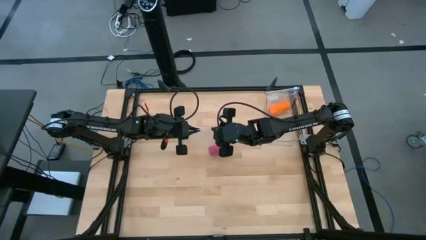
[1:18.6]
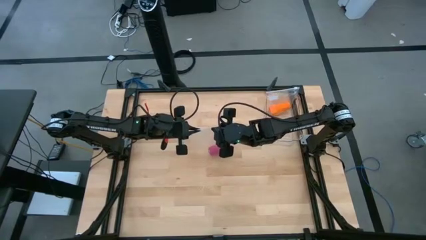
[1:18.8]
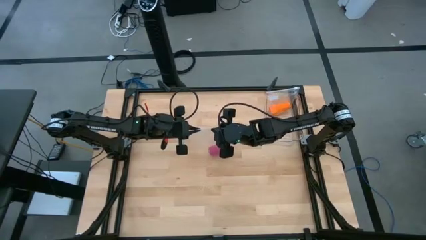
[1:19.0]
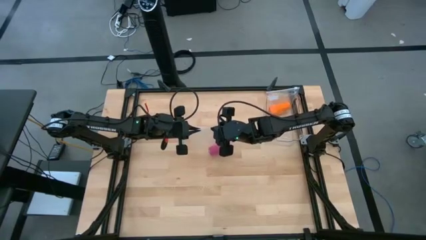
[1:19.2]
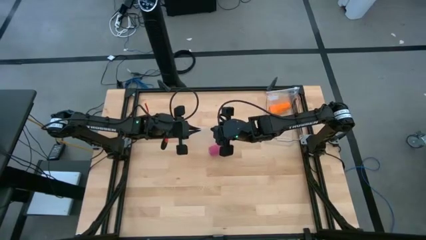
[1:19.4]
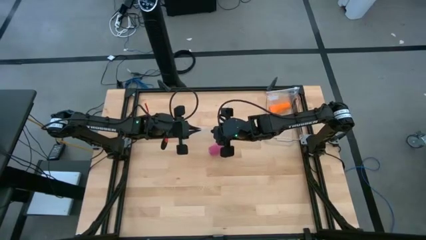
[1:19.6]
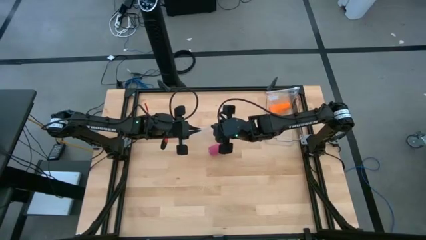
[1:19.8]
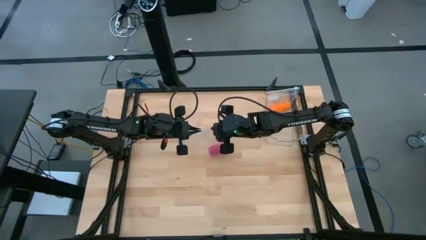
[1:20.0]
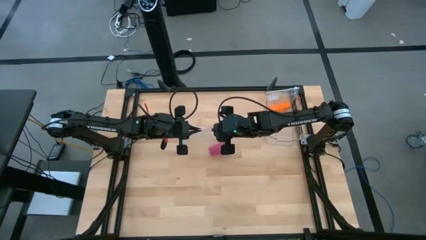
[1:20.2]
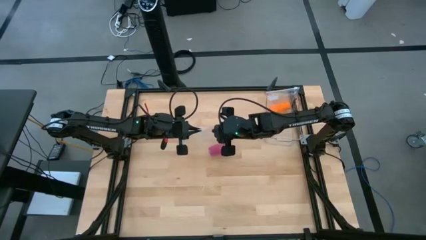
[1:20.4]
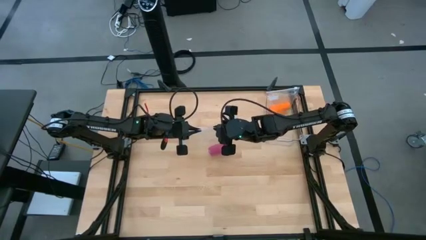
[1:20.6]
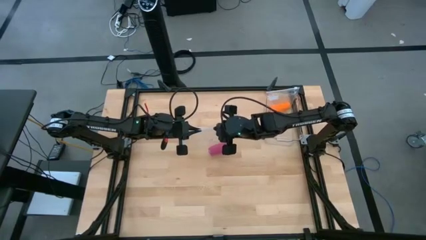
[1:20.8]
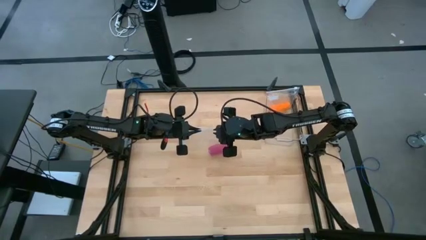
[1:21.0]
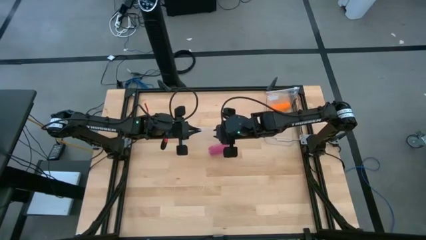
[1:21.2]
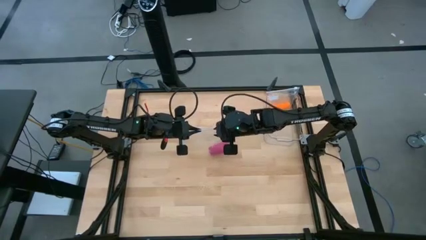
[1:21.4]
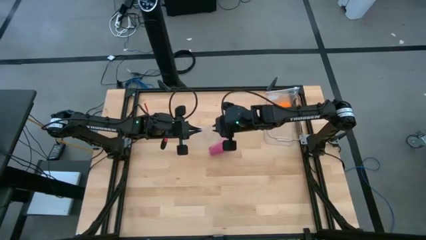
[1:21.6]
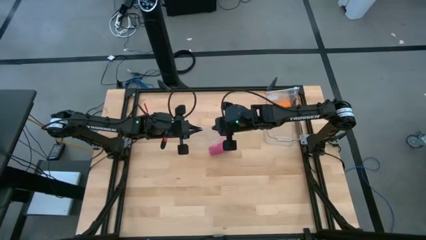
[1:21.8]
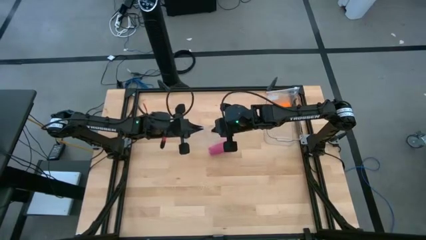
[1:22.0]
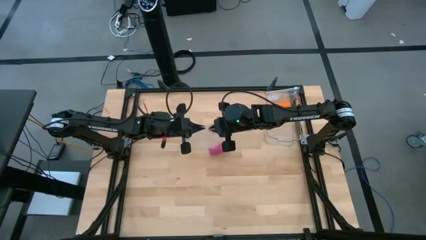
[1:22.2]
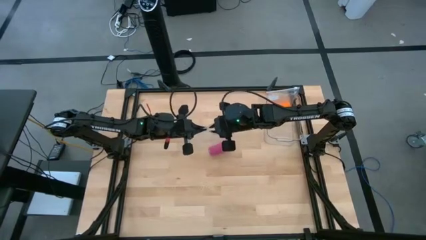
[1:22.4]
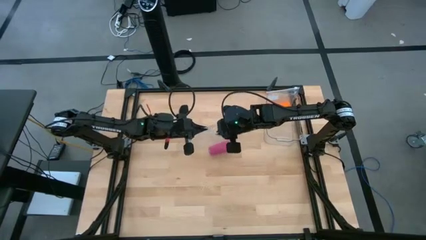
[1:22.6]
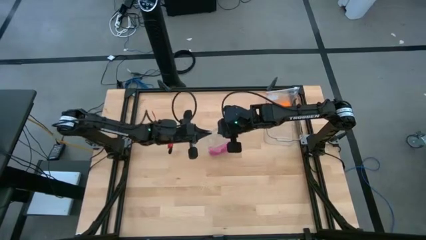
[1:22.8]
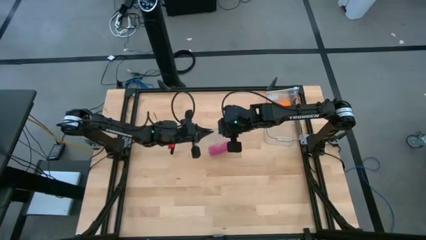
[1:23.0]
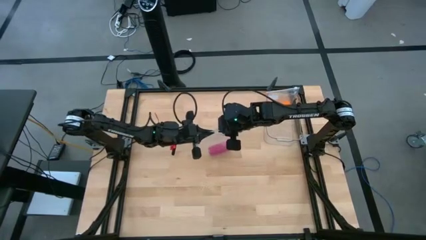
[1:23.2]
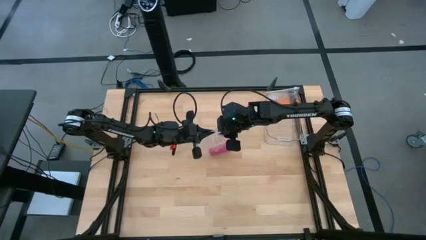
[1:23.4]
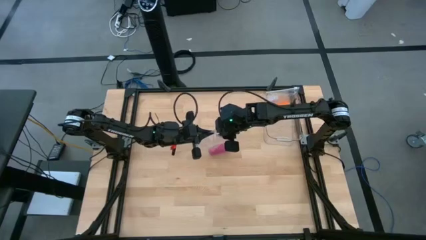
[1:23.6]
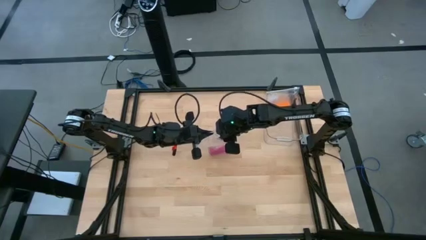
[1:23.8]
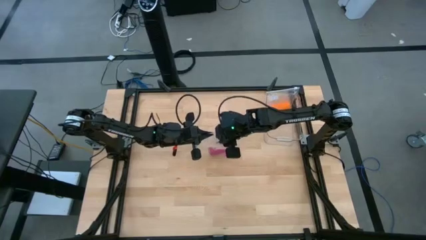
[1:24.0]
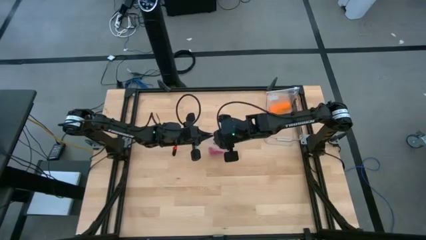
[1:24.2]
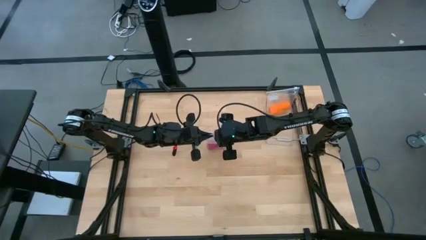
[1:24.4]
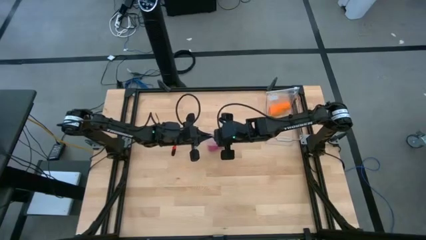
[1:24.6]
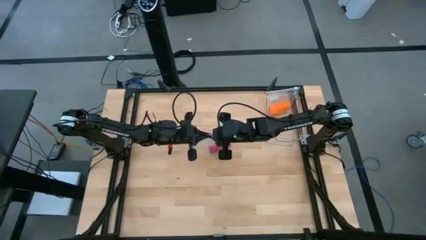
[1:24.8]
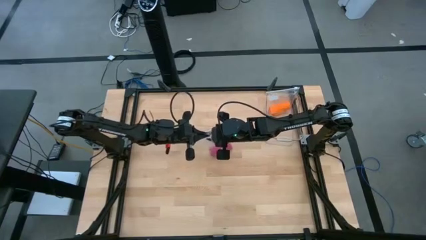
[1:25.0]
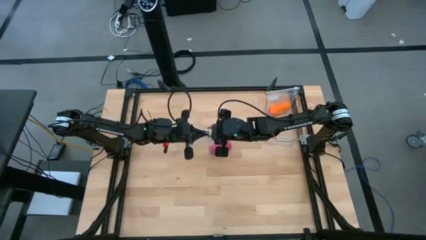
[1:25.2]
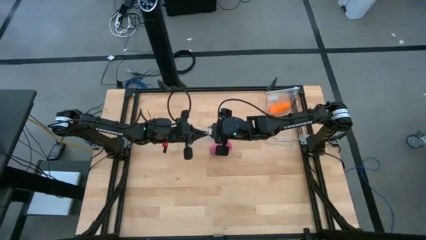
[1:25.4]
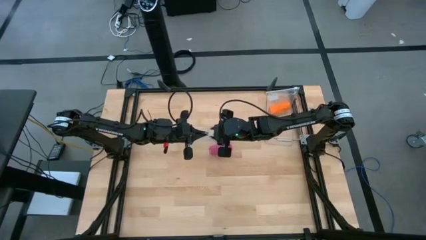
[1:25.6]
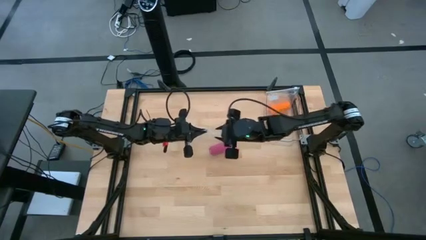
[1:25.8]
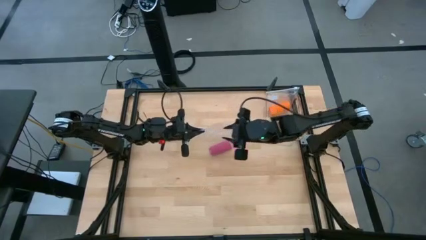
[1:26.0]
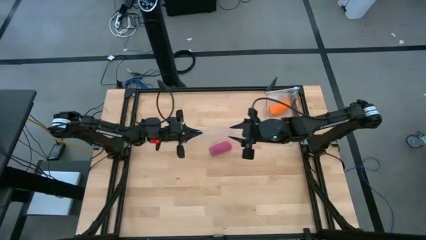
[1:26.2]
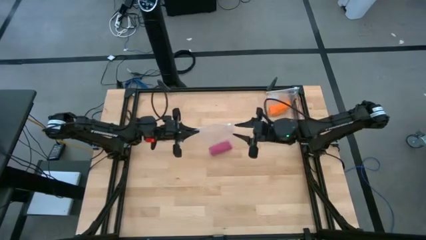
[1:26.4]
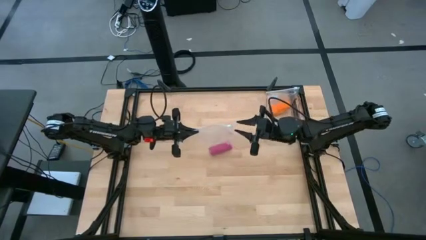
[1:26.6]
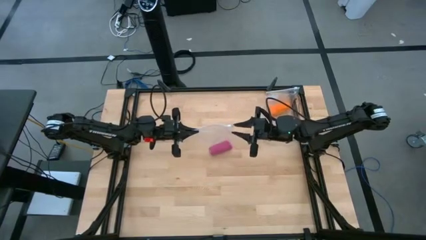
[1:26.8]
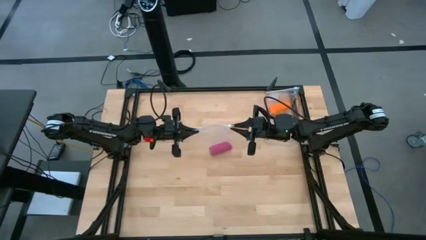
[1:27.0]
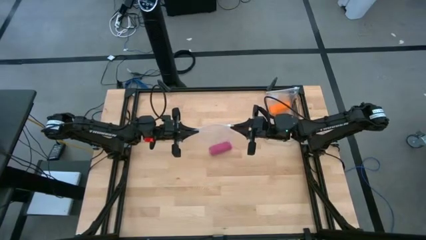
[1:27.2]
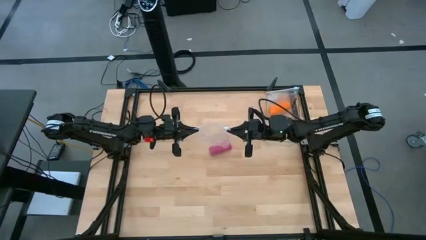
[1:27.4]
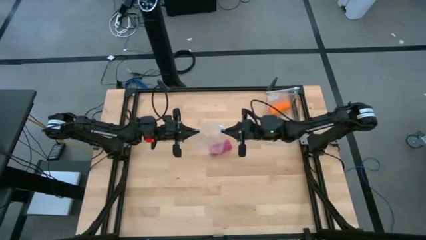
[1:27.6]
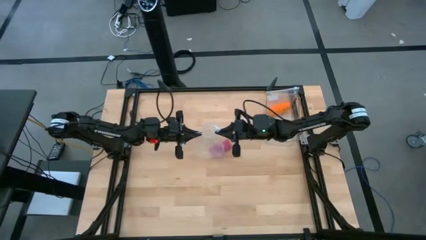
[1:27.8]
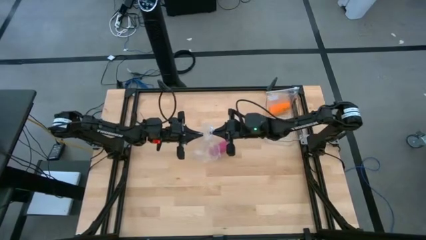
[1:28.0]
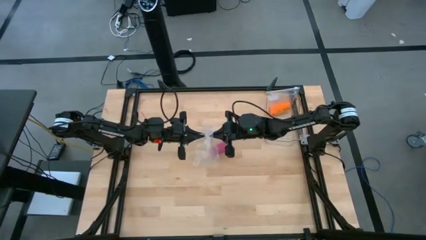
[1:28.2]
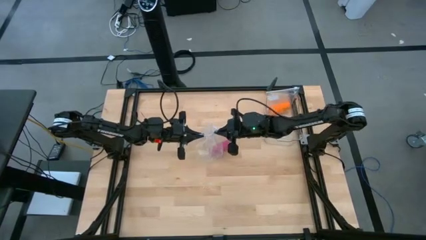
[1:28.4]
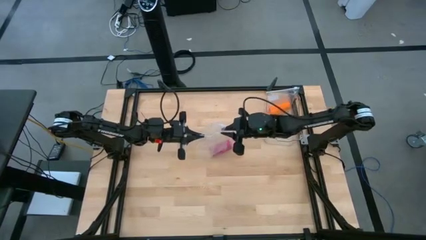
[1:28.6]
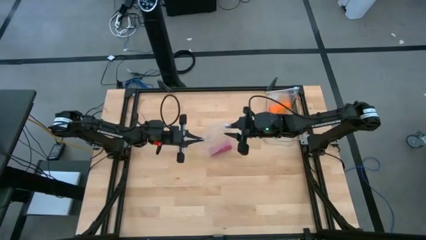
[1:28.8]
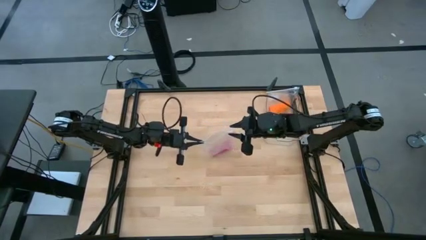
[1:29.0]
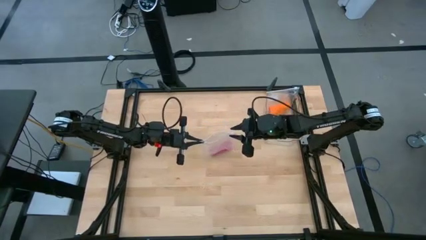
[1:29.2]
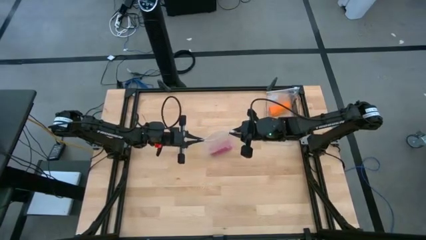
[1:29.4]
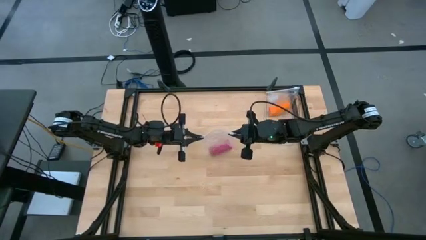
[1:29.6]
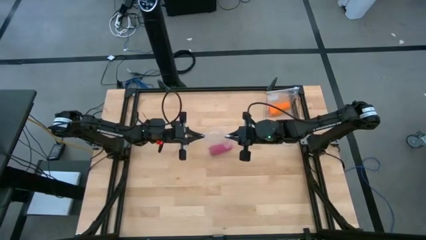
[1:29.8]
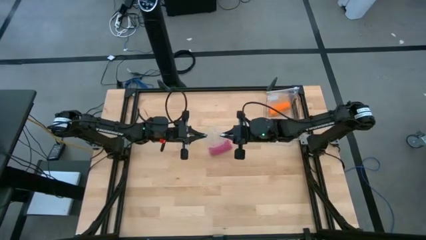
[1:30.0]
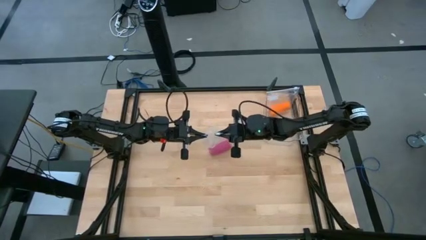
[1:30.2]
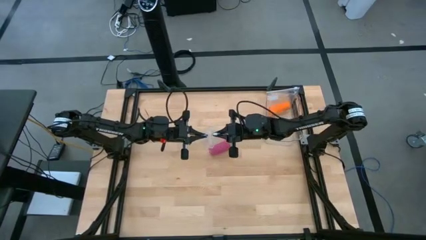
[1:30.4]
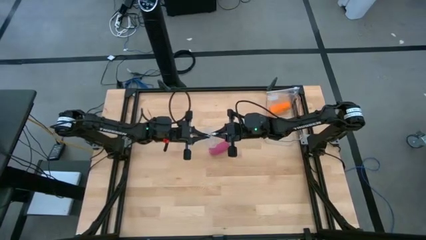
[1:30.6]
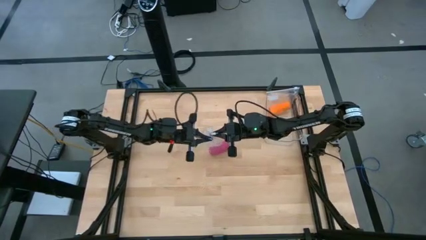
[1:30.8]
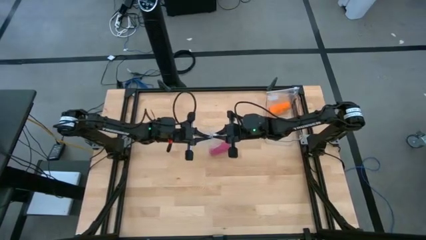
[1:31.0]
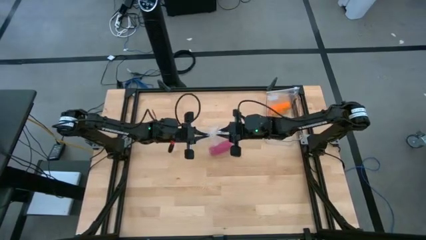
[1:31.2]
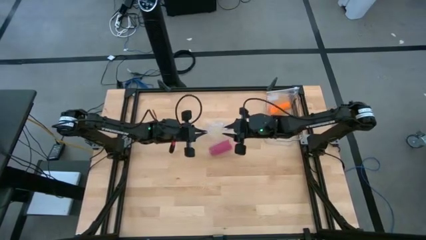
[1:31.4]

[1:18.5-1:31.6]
Task: Roll bandage
Open the transparent zip bag

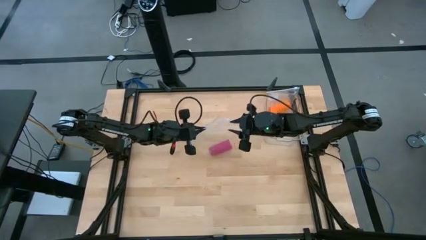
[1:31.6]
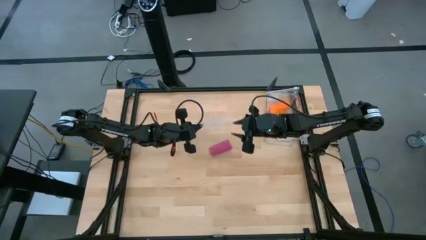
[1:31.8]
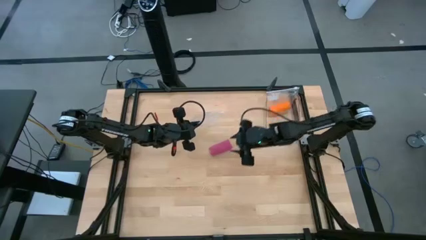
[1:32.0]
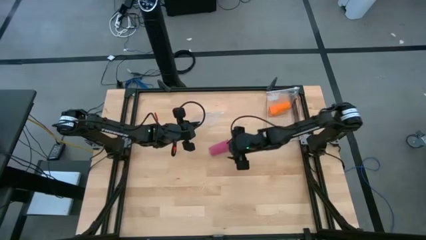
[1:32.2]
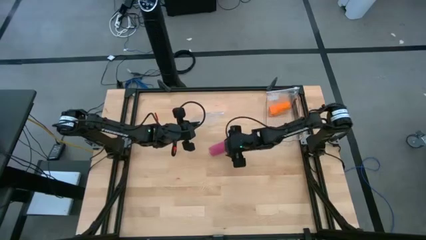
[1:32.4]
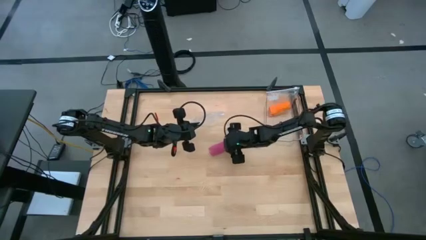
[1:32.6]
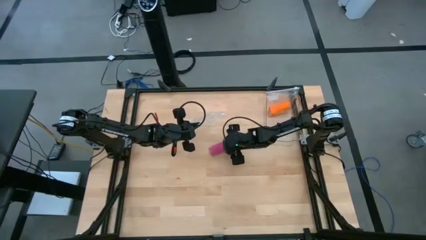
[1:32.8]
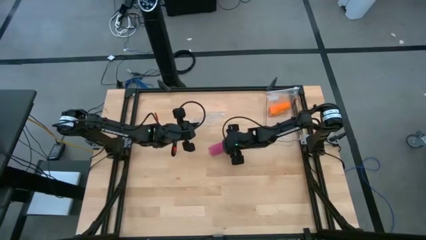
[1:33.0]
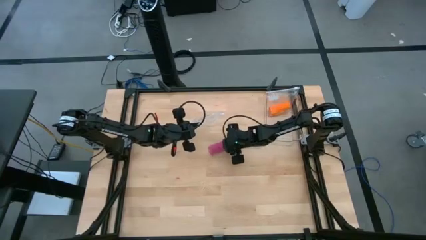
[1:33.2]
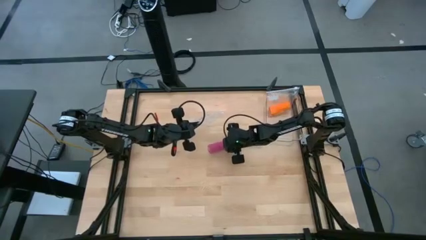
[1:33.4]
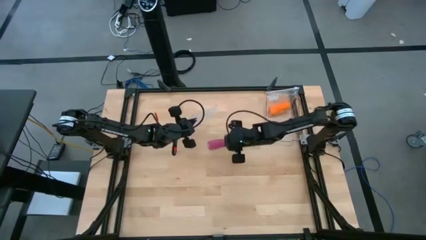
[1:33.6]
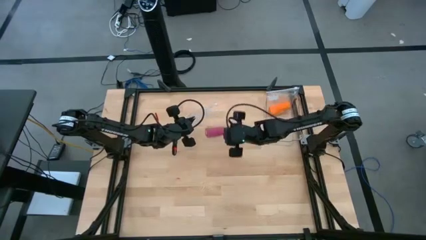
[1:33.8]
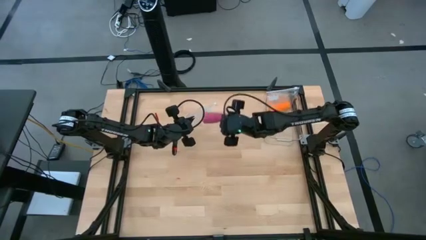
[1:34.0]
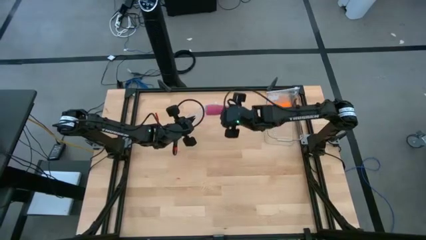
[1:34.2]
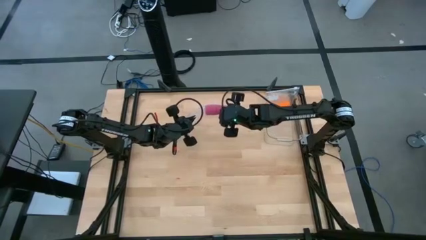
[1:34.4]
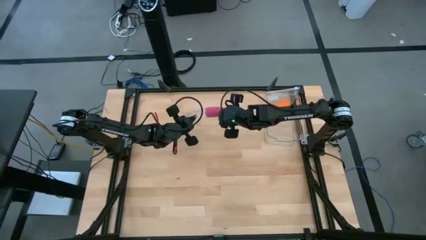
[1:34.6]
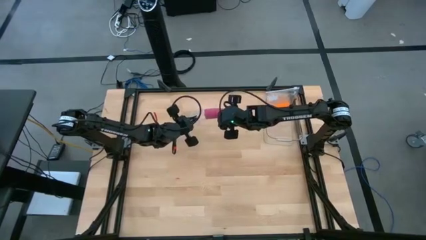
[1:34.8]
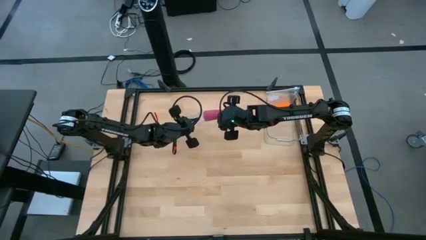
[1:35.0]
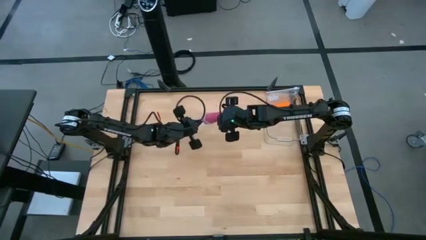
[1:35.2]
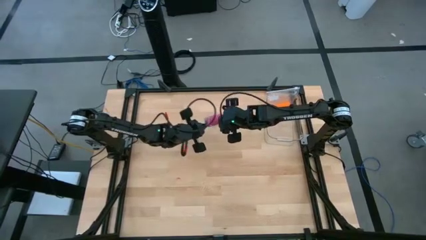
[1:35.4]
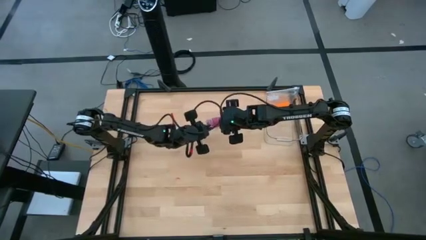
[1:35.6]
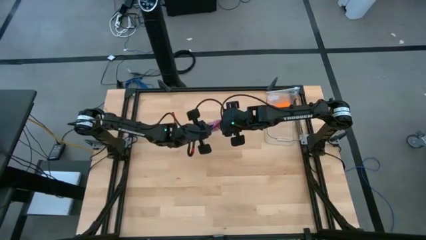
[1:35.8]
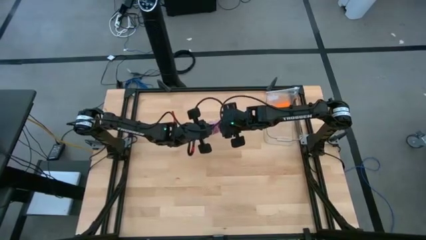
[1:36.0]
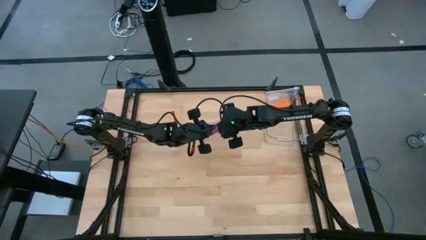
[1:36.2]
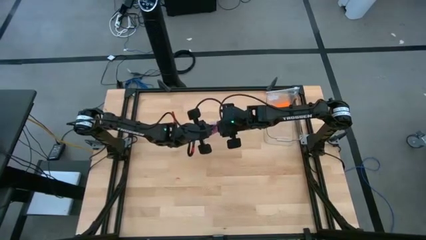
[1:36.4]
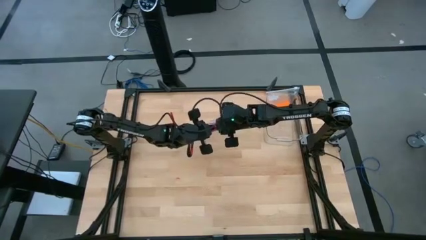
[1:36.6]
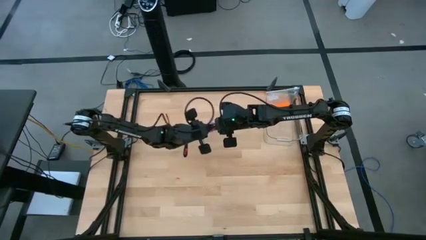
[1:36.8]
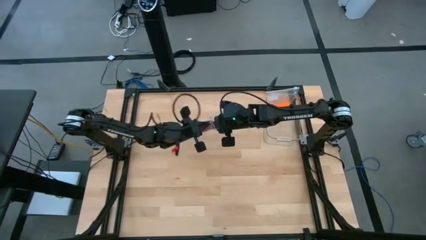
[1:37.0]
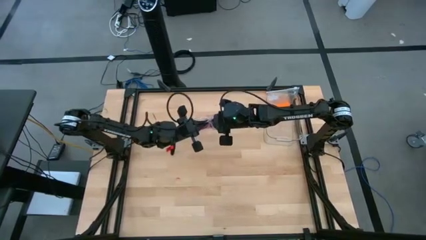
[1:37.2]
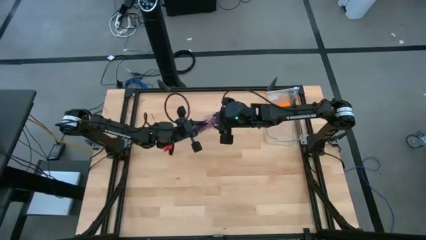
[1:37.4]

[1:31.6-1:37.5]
Put the pink bandage into the transparent zip bag
